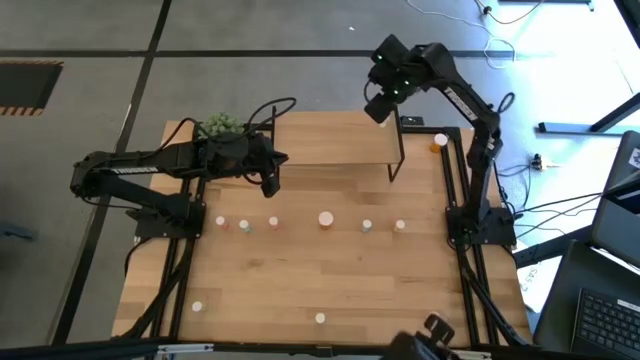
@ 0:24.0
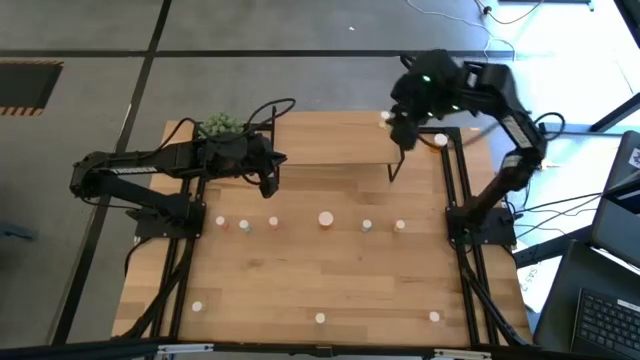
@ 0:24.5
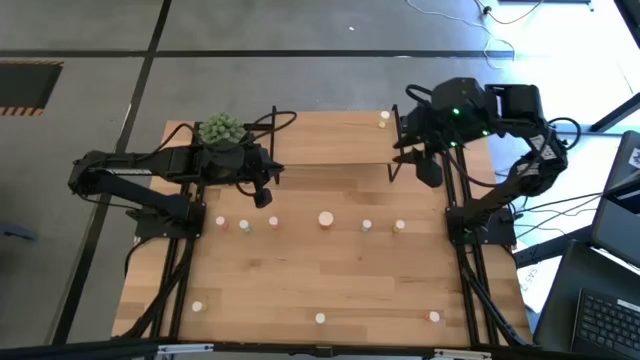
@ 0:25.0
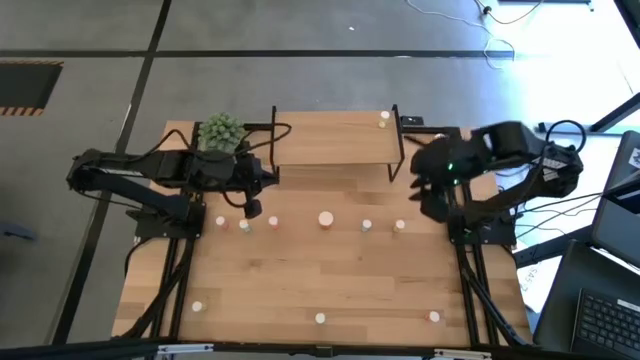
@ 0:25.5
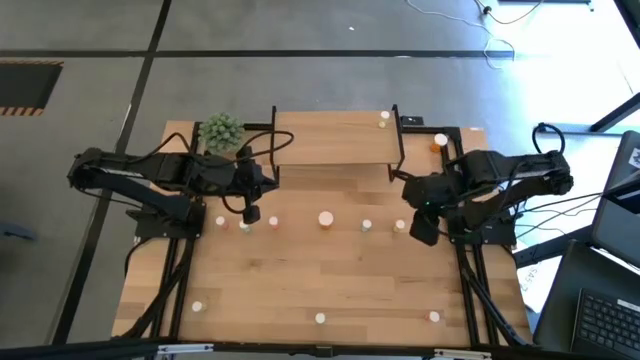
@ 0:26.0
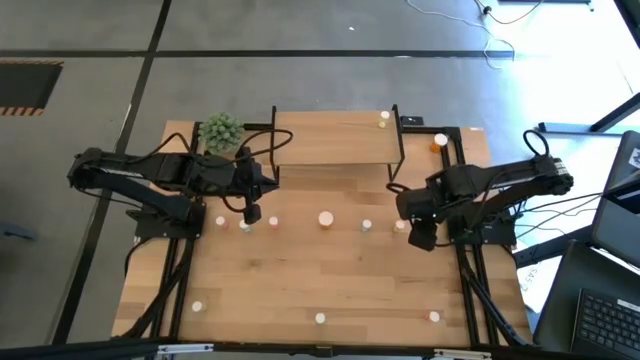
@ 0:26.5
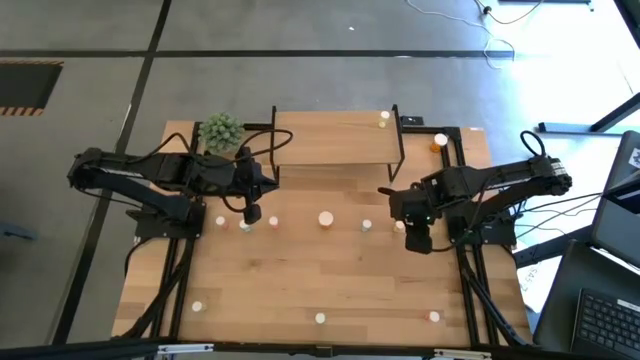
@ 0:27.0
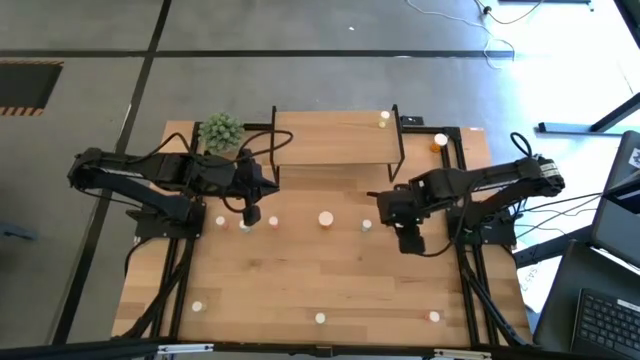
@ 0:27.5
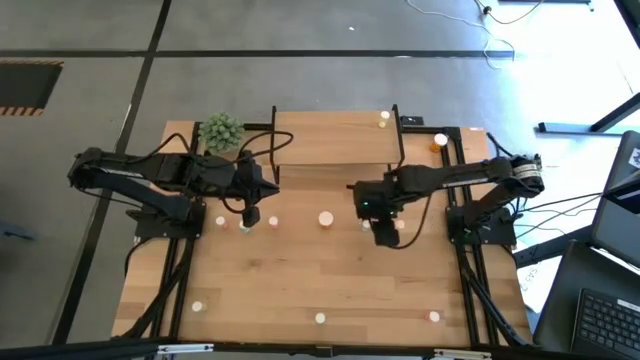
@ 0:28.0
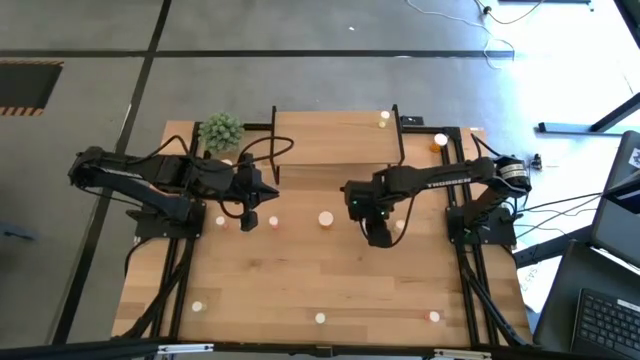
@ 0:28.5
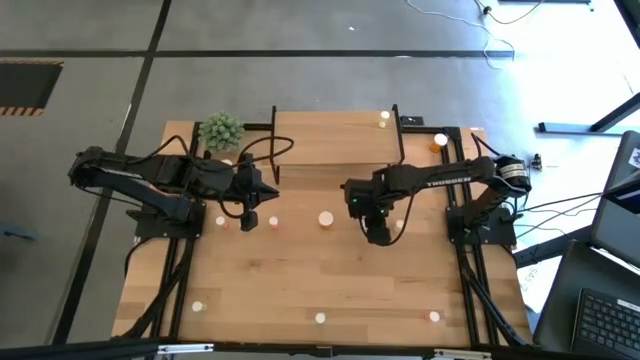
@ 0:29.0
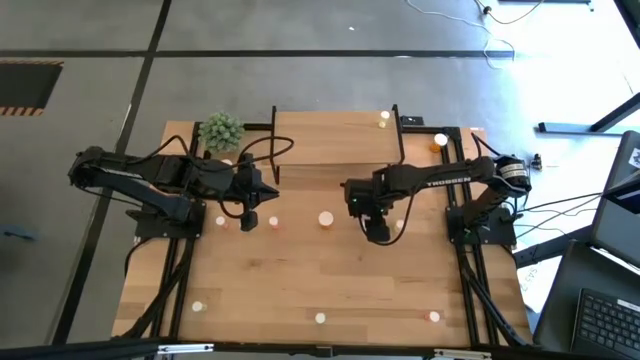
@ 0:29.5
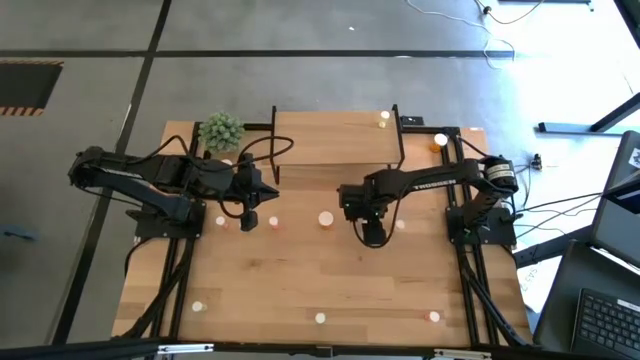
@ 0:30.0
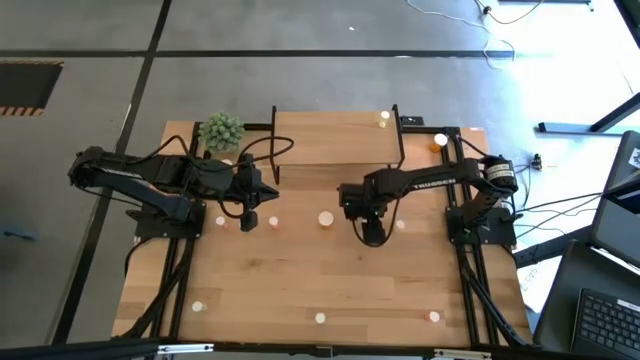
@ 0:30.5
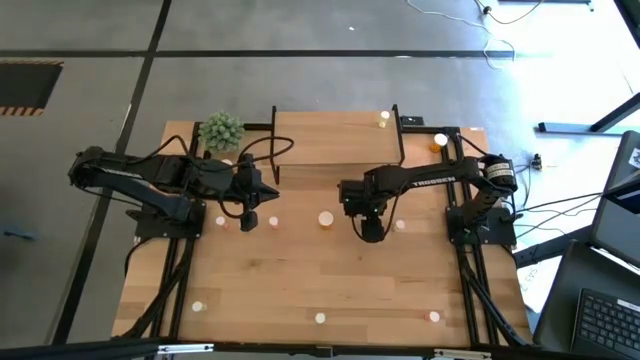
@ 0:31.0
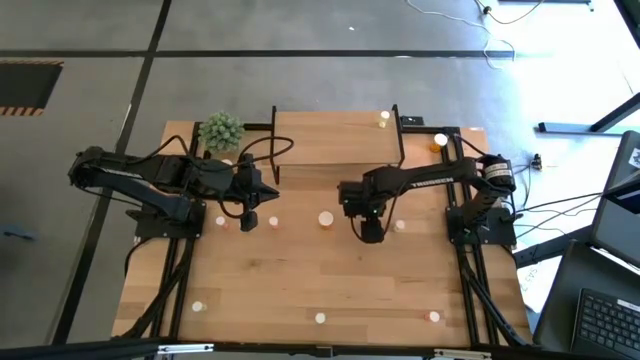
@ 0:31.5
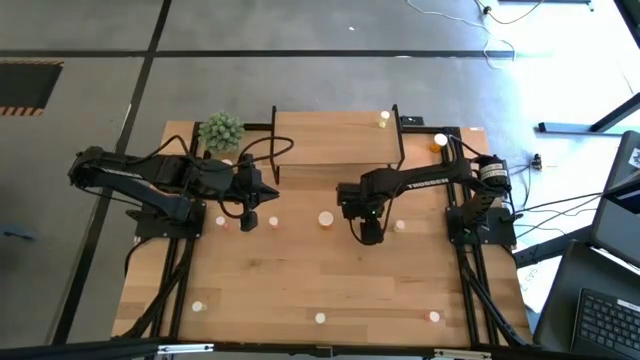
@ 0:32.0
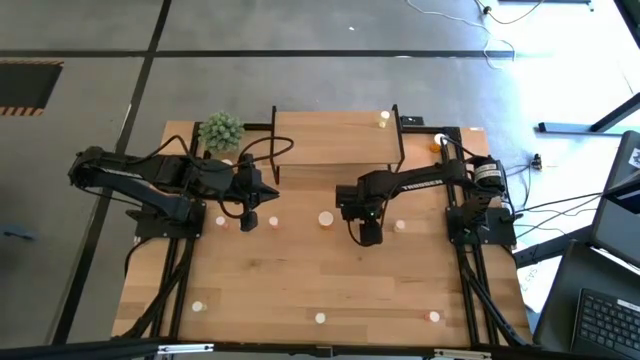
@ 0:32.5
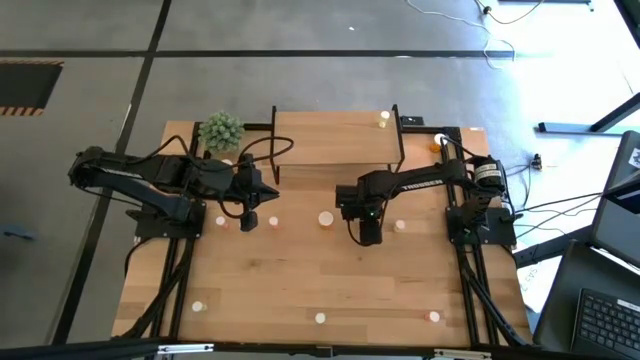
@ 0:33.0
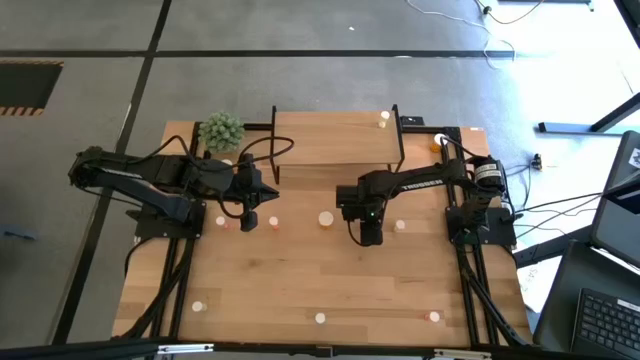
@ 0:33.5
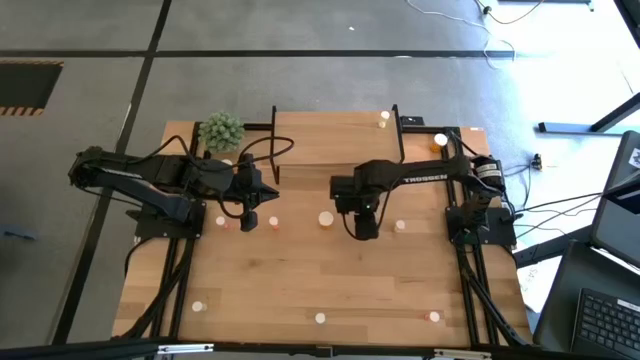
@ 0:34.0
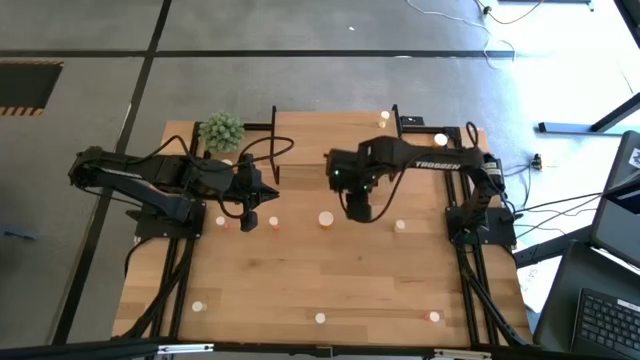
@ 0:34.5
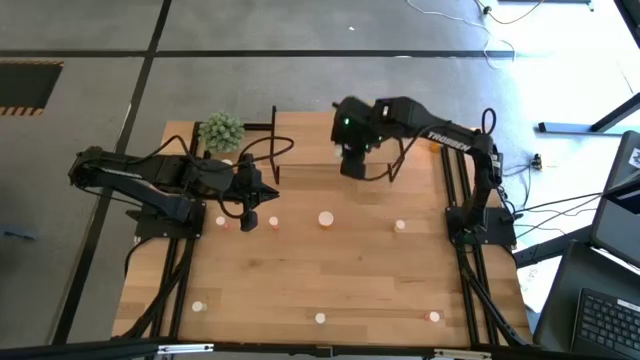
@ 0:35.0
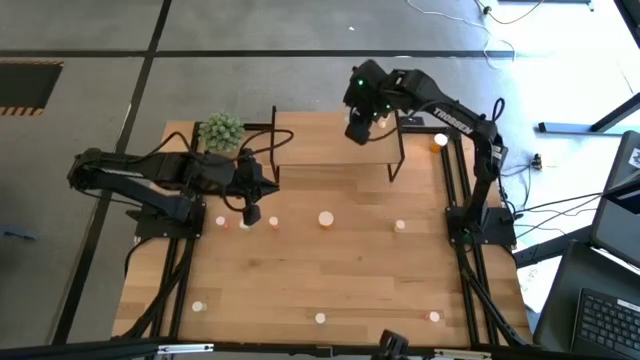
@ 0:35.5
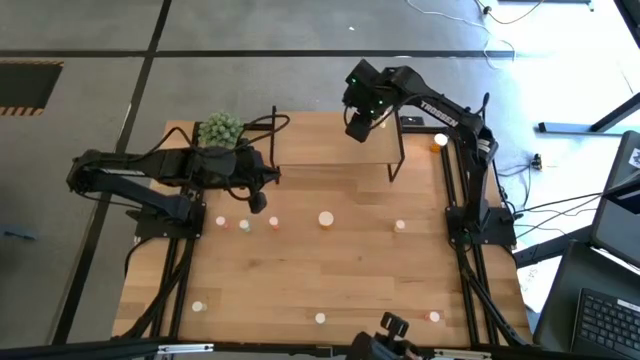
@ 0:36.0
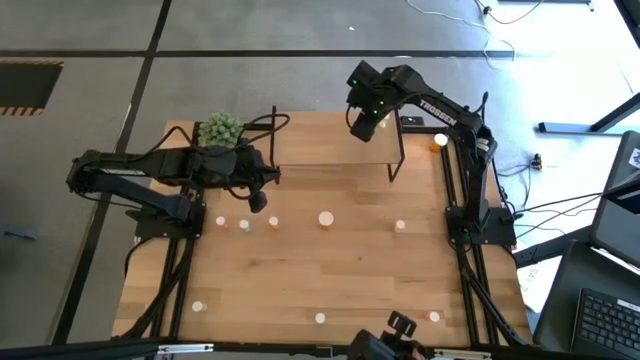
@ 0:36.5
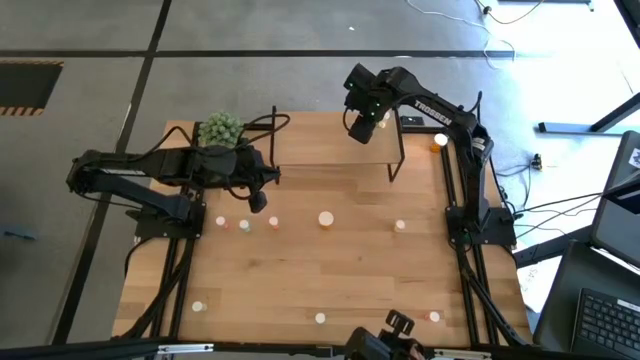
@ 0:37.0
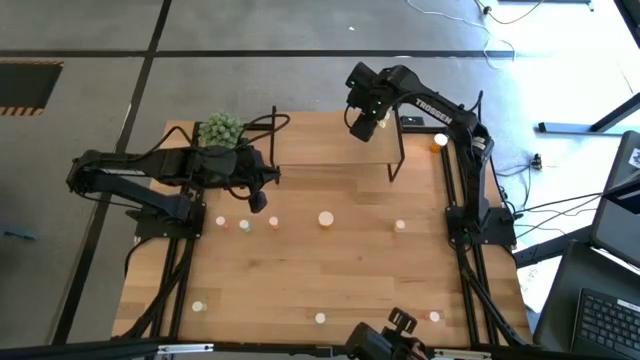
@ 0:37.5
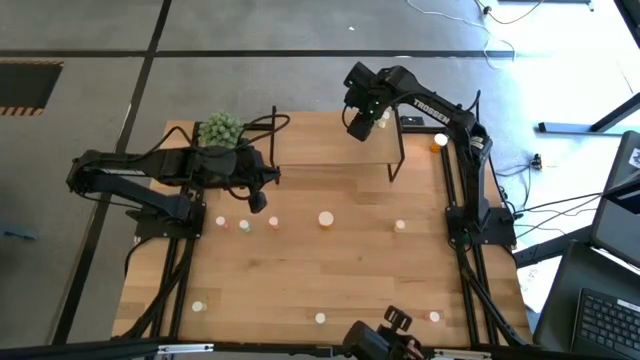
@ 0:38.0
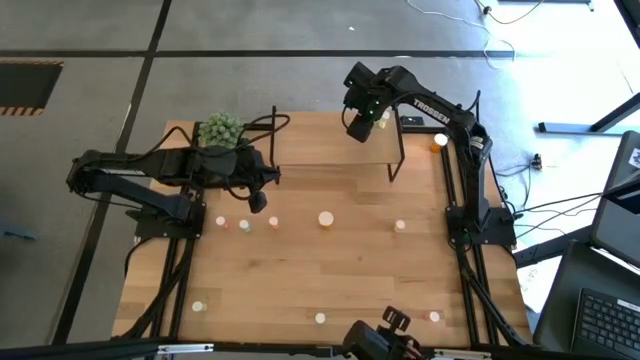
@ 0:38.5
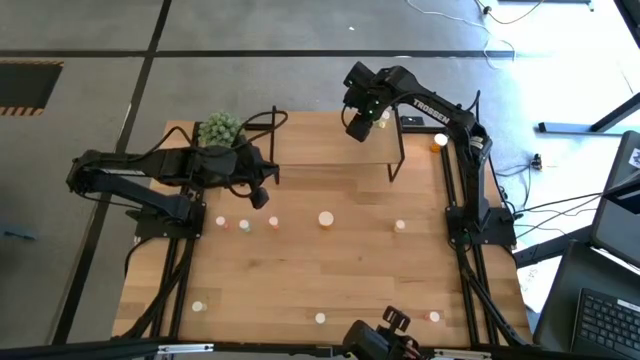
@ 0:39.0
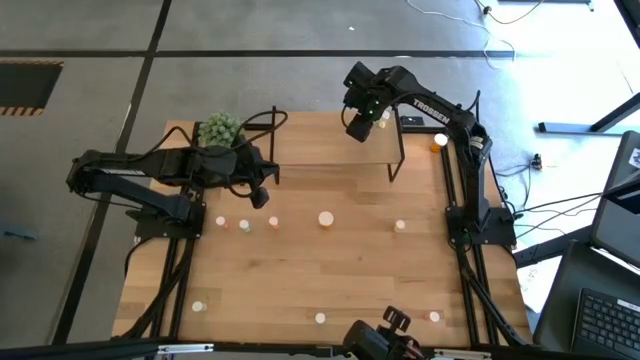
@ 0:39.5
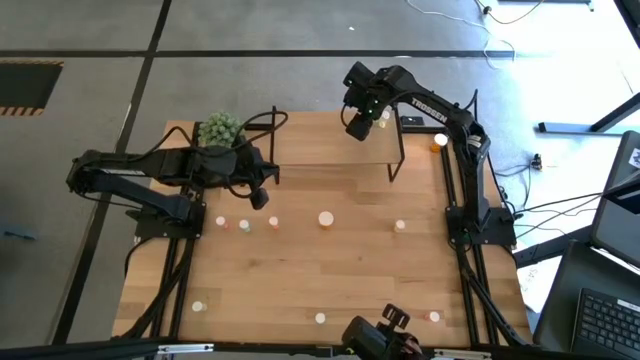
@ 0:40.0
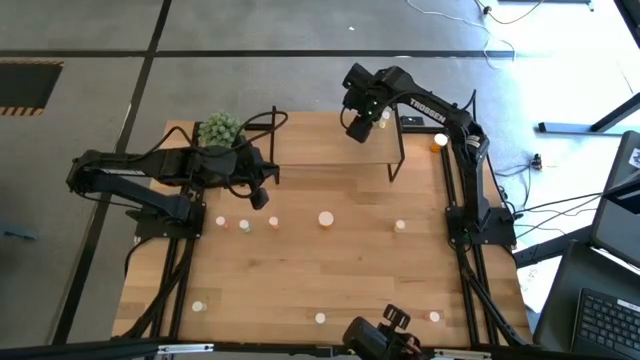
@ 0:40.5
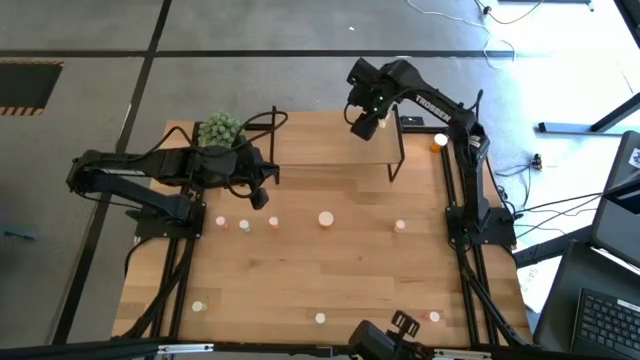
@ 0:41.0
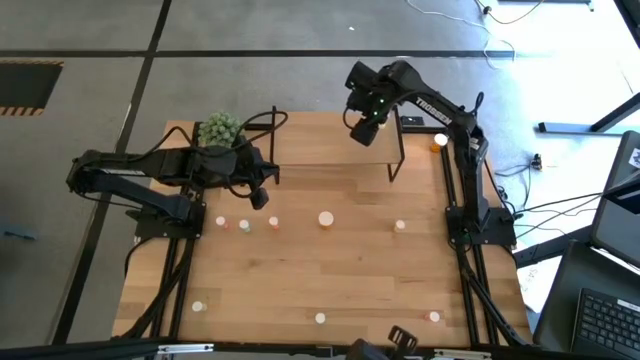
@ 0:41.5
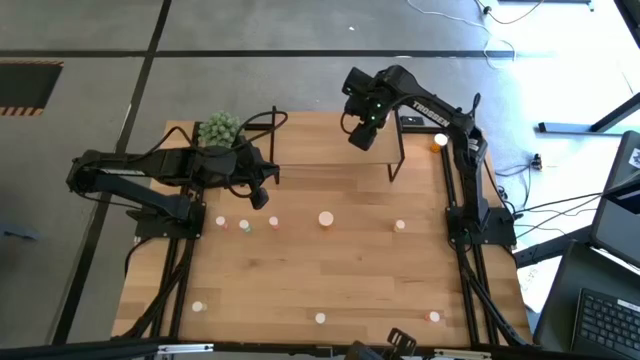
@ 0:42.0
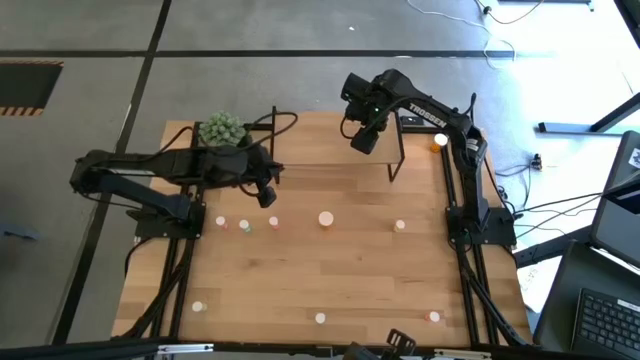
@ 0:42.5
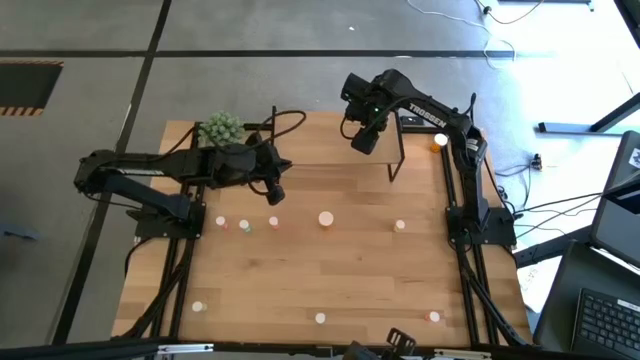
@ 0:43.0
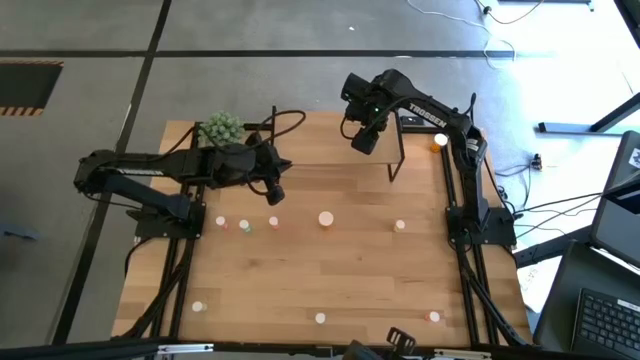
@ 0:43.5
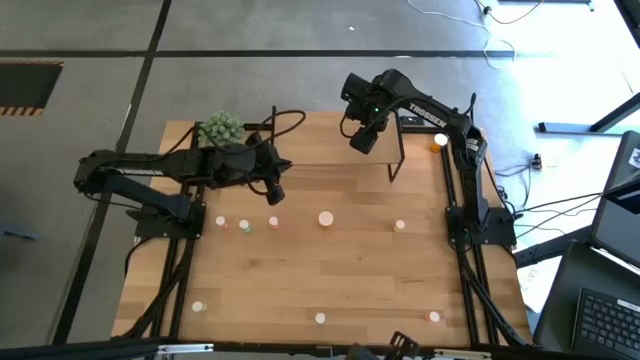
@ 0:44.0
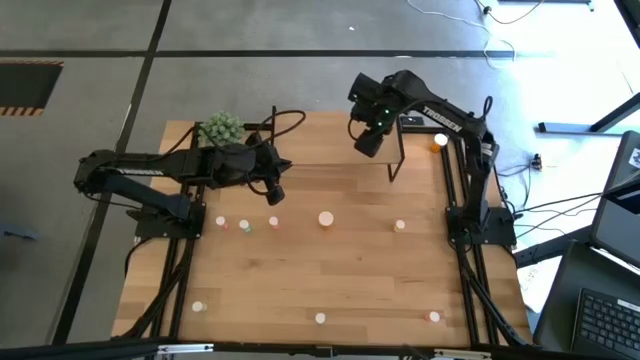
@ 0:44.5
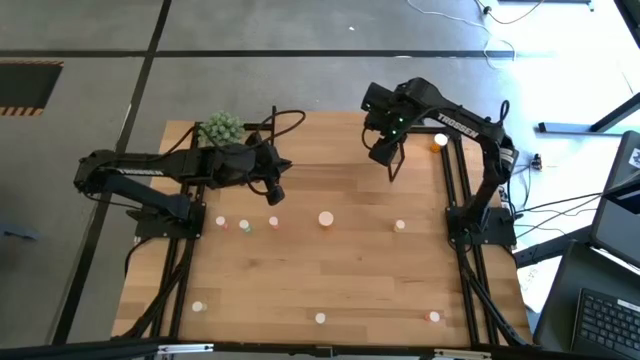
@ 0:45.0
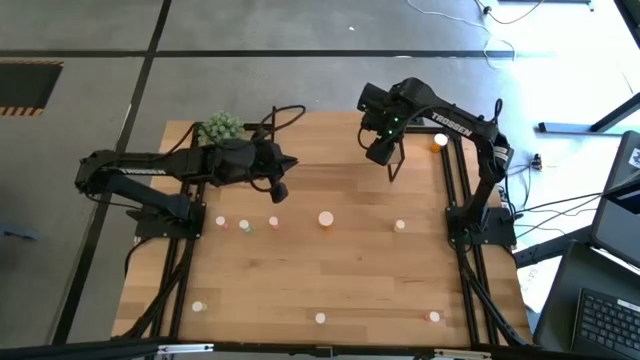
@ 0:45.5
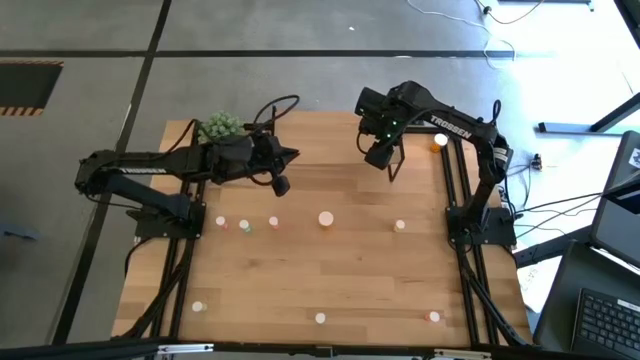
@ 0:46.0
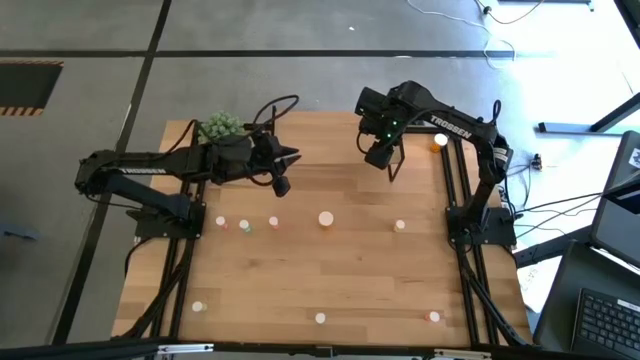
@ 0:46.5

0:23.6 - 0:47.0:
Task: Pick and place medicine bottles onto shelf by color
Put the top right blue medicine bottle on the shelf
